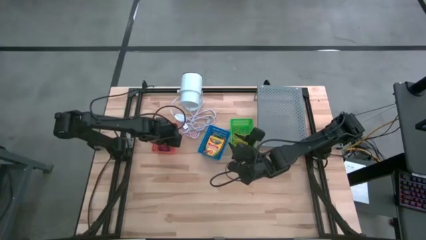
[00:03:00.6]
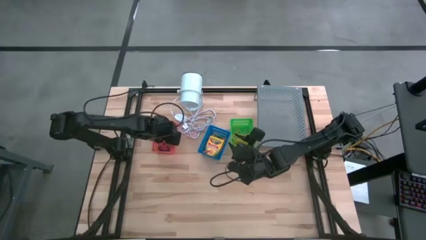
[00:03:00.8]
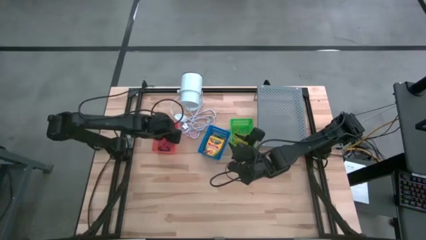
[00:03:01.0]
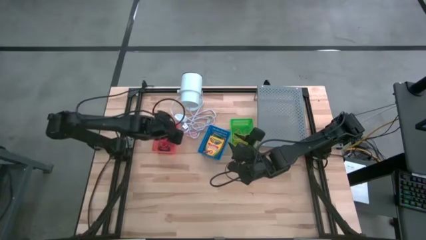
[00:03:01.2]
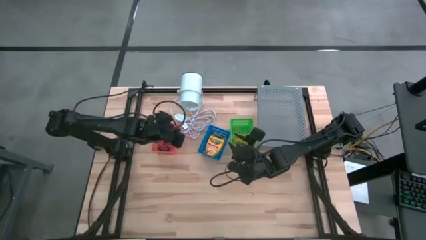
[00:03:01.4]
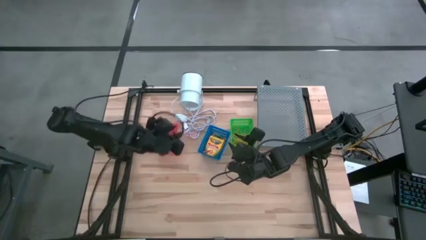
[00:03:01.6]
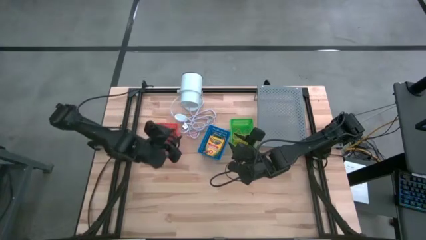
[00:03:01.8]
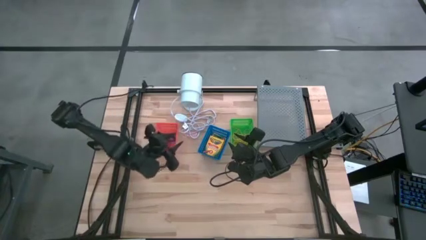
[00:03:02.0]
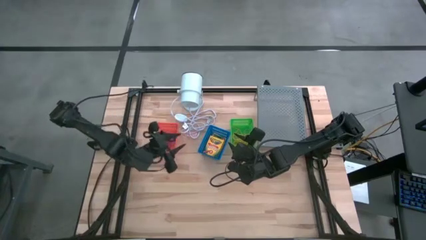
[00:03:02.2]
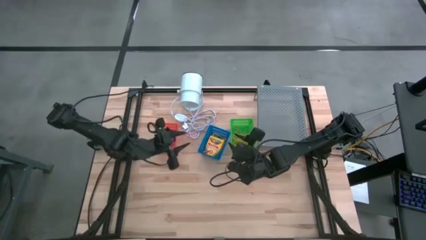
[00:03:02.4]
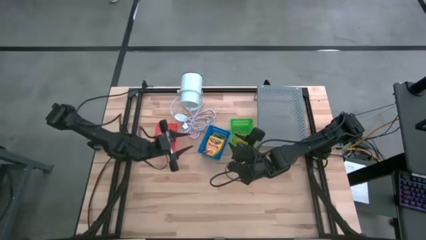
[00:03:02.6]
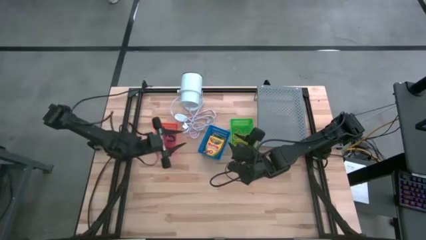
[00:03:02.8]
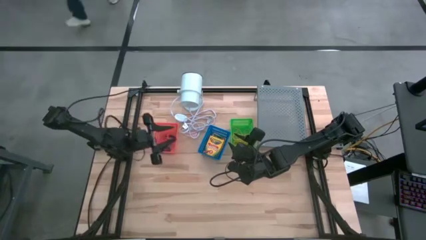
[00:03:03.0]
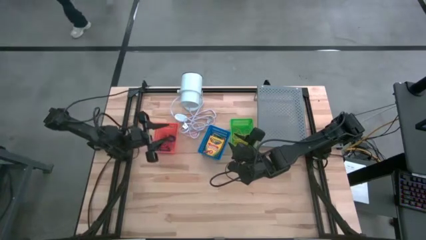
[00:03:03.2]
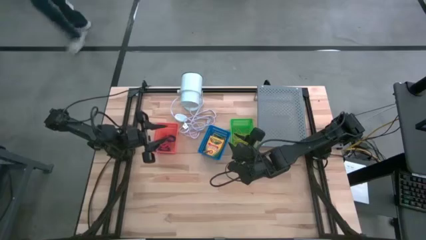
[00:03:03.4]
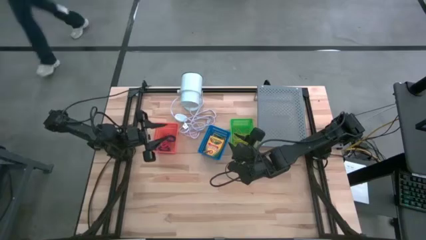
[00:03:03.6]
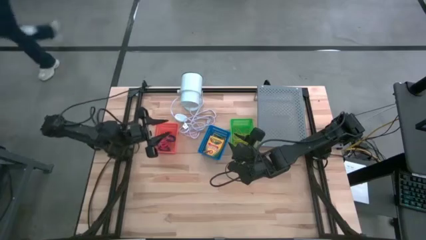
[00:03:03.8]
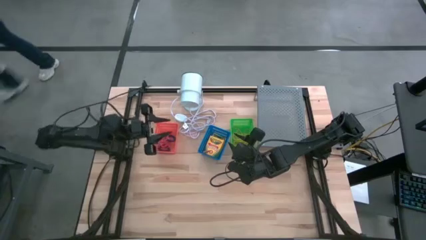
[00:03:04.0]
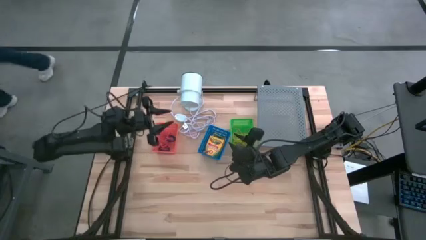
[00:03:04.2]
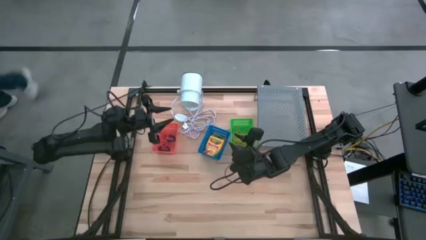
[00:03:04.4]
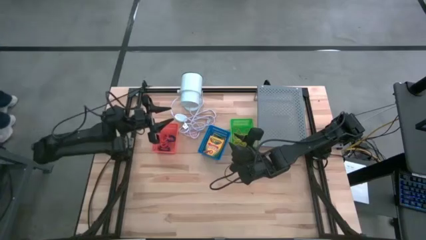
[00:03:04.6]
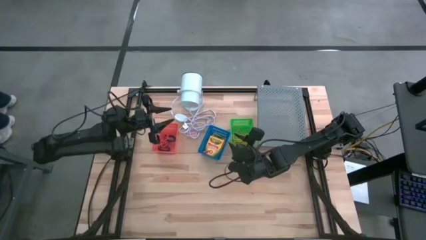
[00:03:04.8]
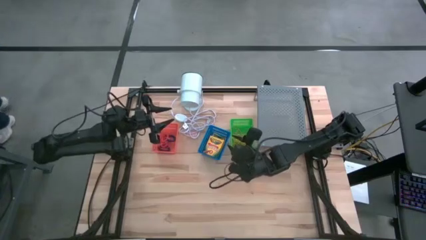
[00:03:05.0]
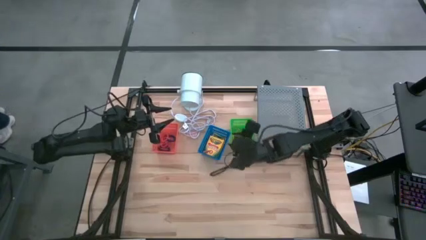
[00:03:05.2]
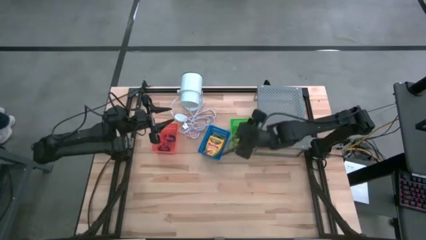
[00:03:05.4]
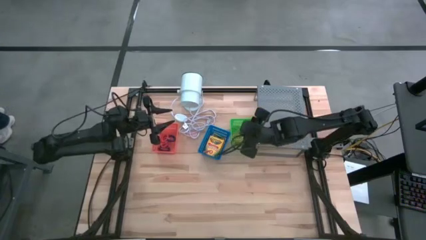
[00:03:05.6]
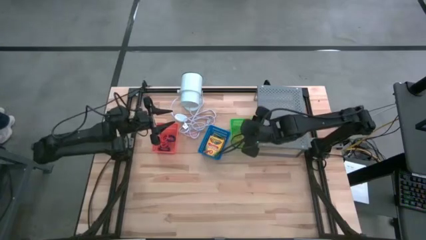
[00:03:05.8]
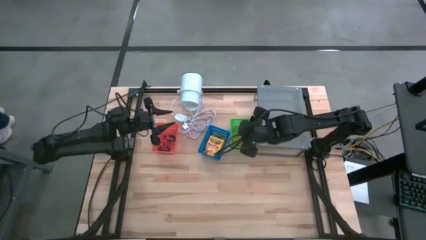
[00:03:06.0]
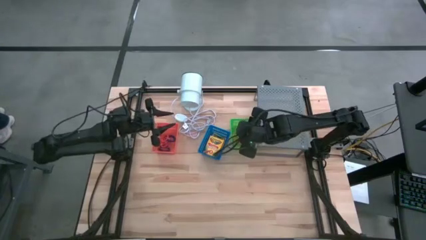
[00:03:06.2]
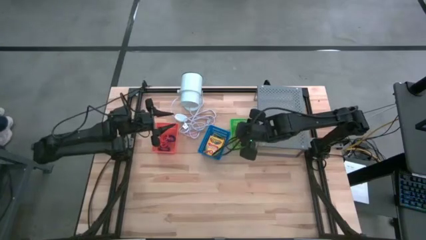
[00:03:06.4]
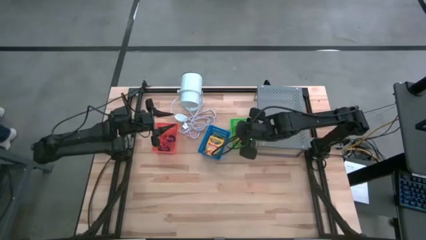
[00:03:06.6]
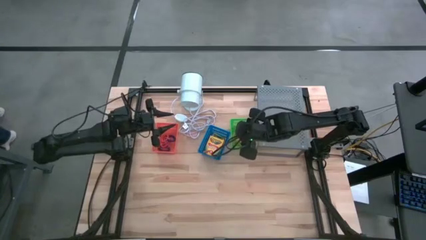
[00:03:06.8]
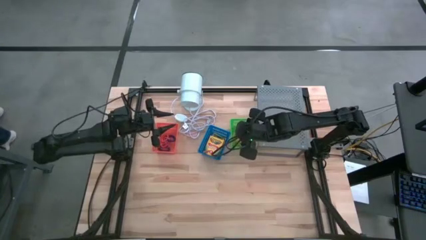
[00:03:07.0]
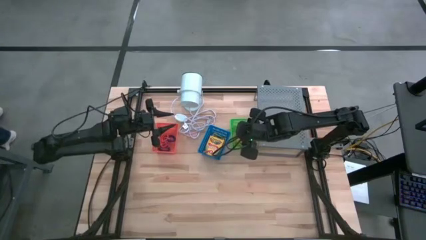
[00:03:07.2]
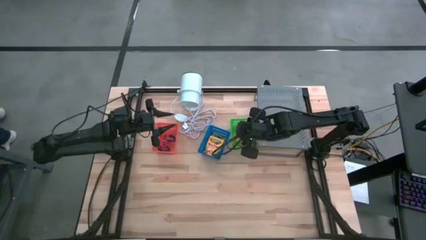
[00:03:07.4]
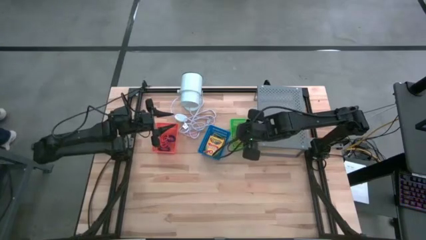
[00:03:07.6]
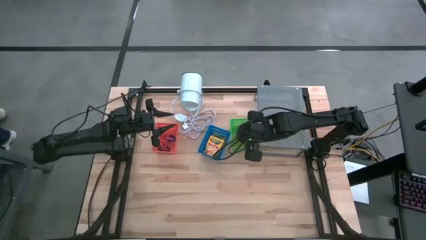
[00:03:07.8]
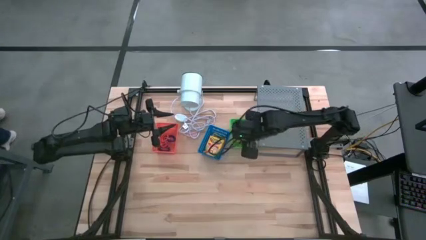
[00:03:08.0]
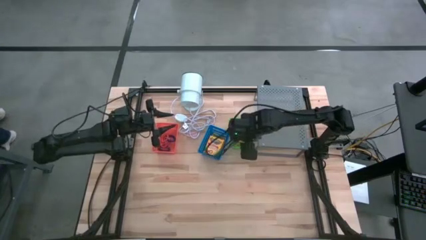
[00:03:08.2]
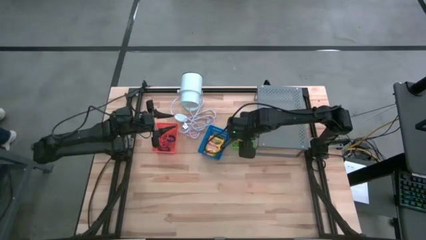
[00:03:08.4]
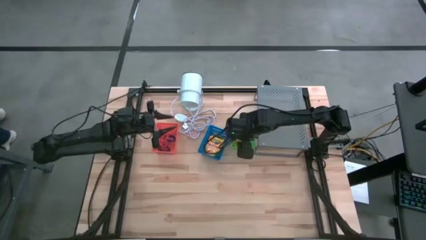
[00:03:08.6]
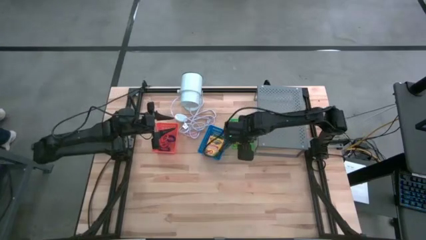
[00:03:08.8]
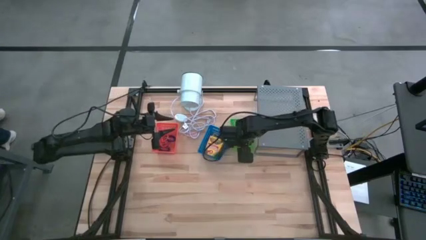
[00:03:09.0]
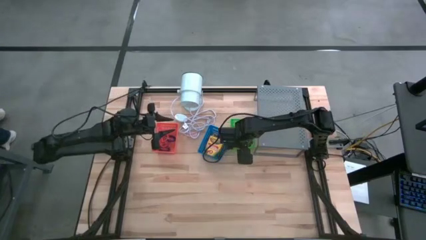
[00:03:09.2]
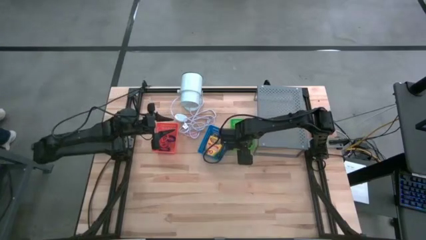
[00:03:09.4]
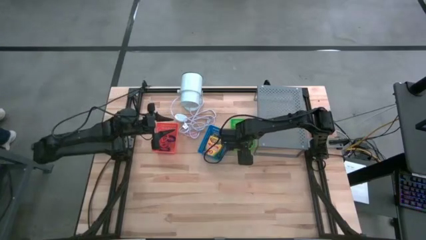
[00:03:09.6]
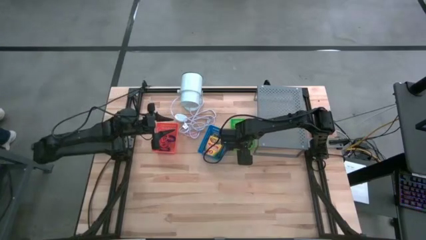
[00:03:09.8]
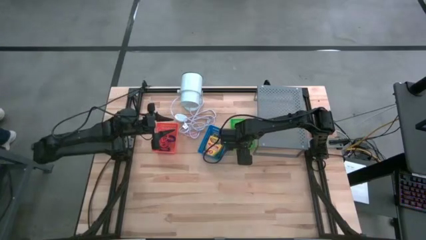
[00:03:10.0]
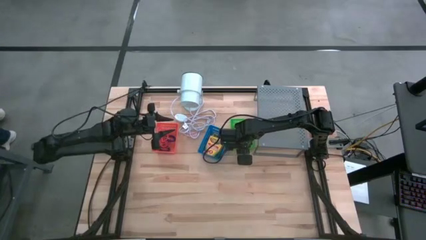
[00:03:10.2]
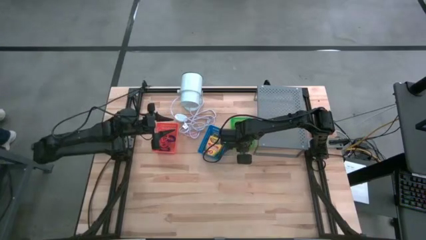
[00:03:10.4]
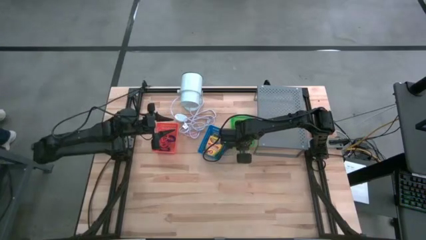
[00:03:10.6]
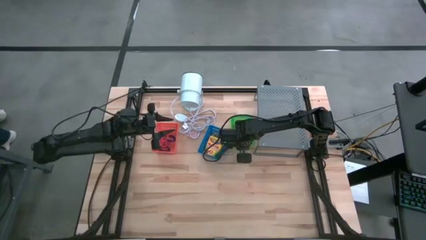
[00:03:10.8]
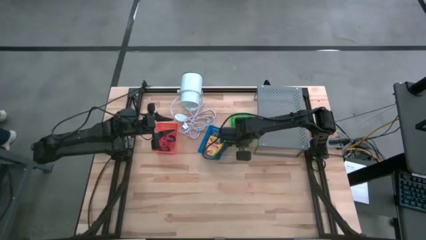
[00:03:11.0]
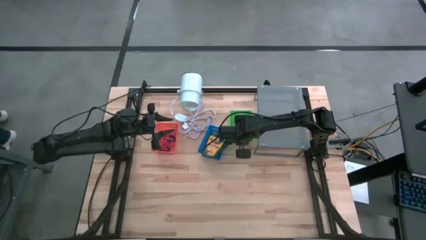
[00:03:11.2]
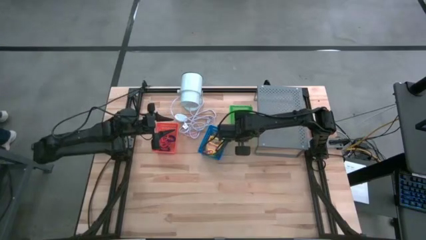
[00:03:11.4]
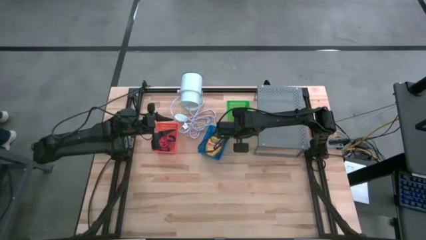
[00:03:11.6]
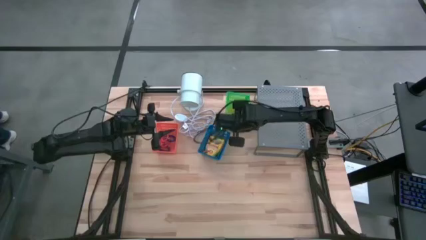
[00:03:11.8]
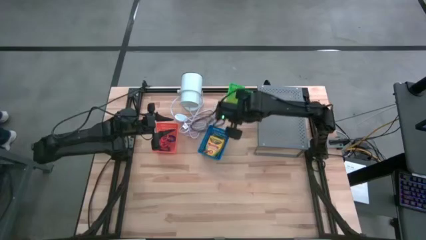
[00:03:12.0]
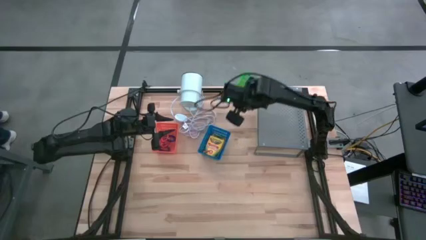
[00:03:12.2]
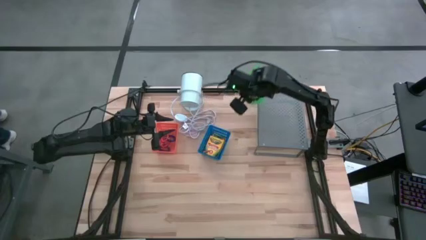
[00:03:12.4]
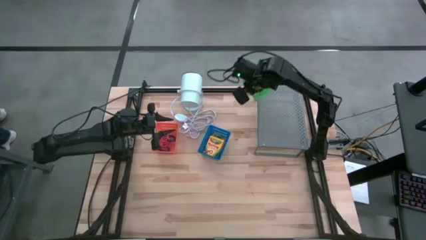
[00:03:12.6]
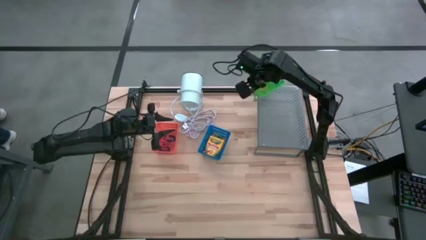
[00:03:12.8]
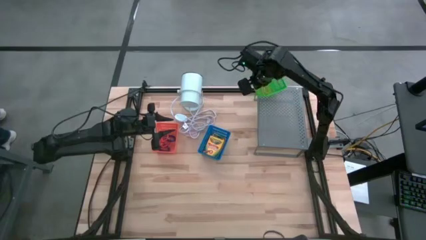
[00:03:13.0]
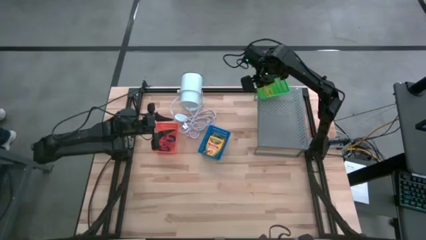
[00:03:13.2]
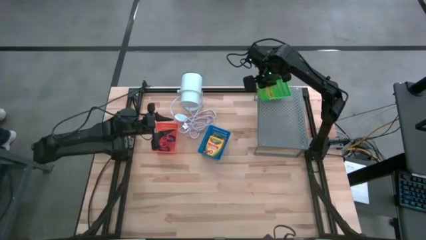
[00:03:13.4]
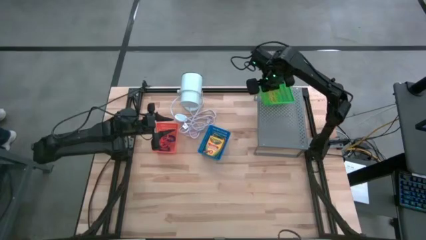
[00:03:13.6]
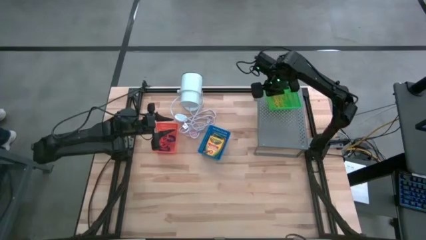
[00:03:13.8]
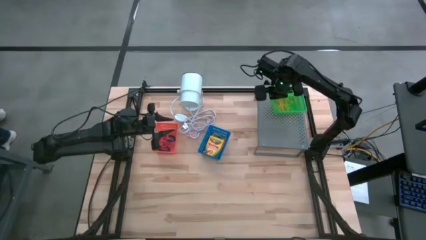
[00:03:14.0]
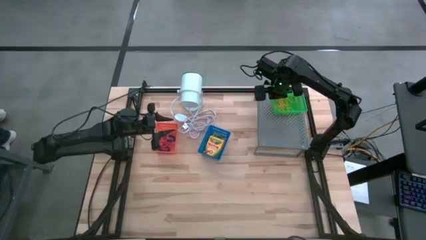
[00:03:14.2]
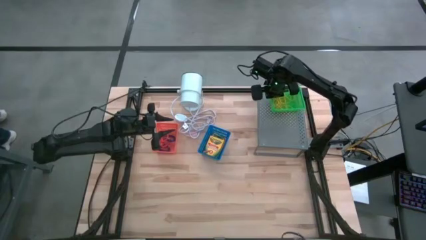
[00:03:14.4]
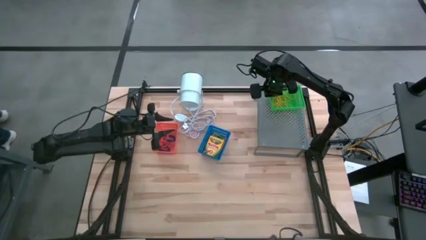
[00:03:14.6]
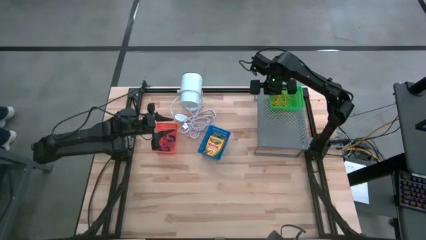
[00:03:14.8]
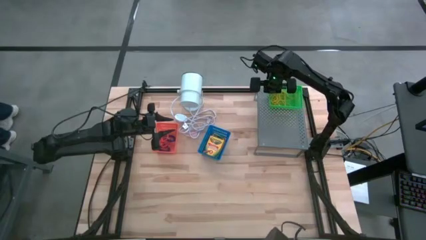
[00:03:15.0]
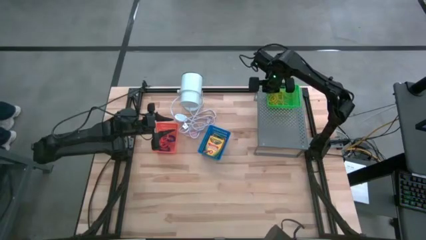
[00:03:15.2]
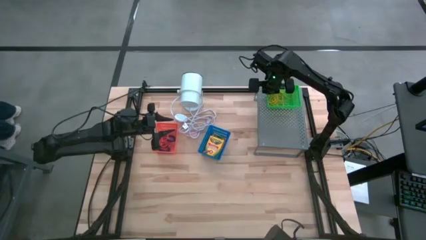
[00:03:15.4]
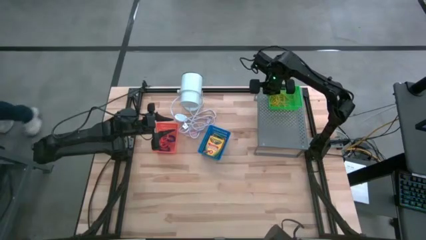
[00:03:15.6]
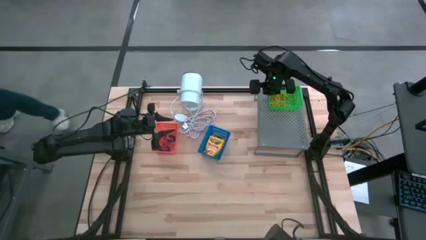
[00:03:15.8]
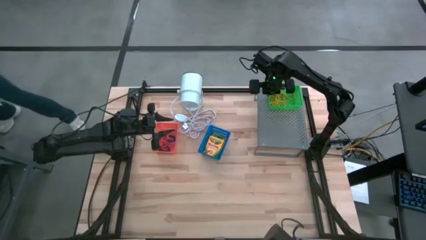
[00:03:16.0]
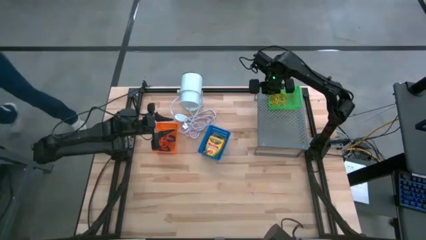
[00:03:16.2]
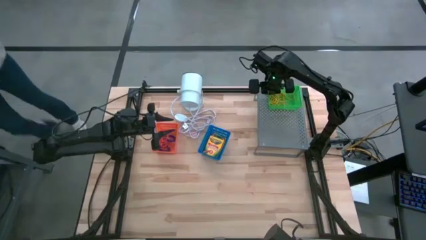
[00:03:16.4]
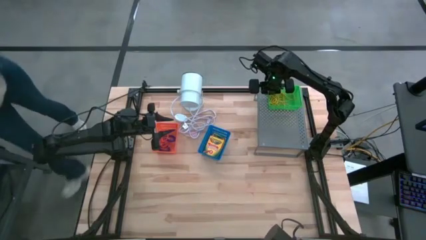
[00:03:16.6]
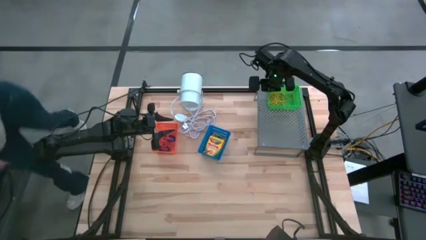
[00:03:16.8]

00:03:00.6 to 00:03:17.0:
Task: Pick & Place Office Desk Supplies
Put the green bin filled with rubber bands on the shelf
